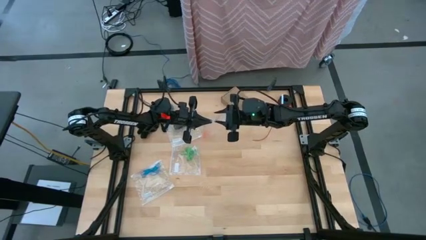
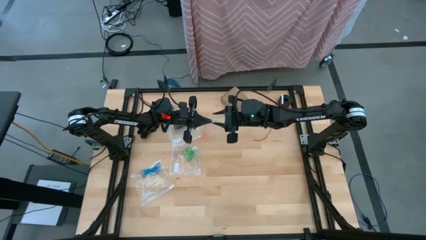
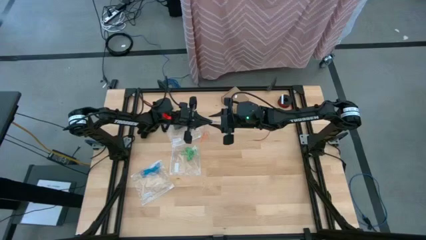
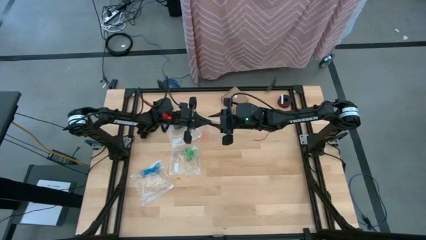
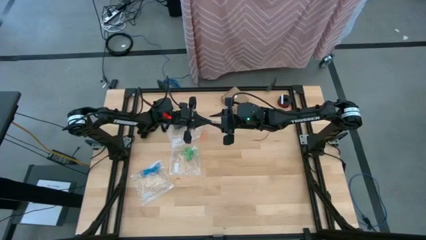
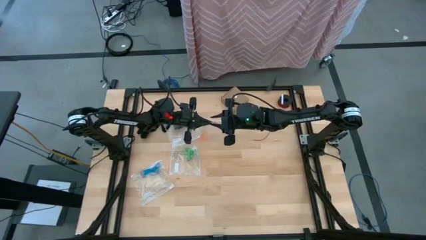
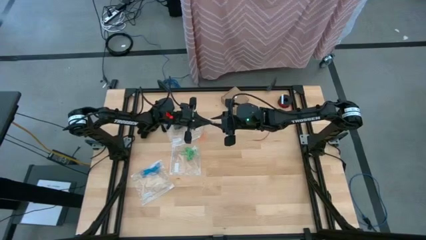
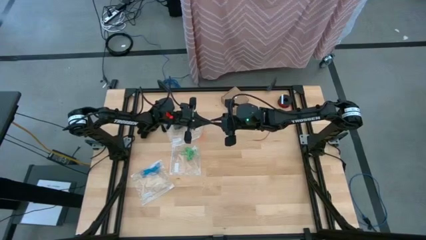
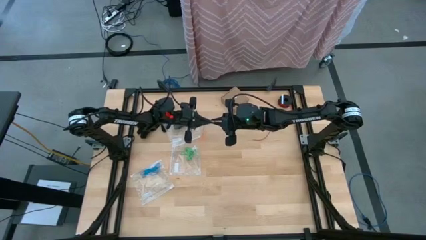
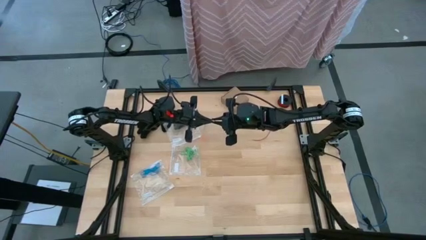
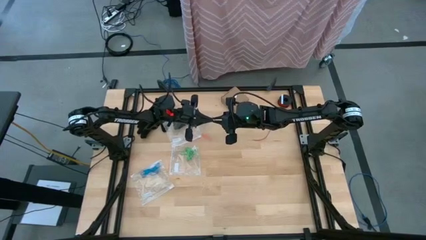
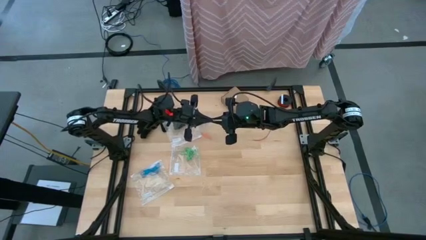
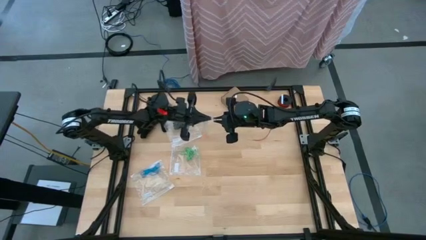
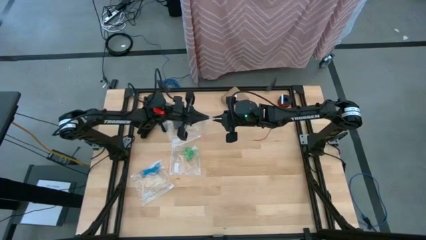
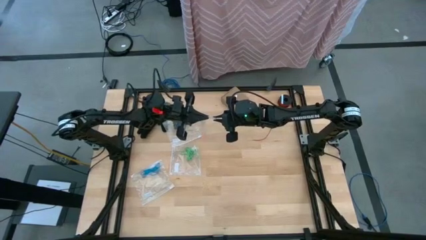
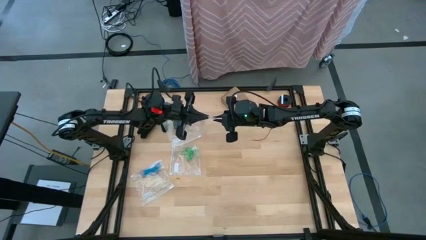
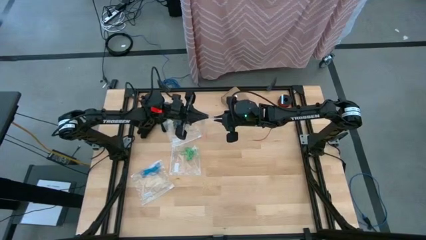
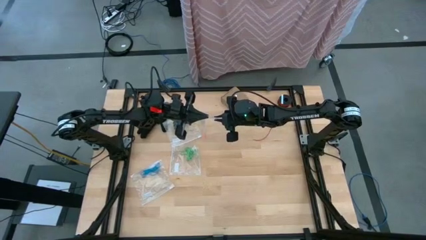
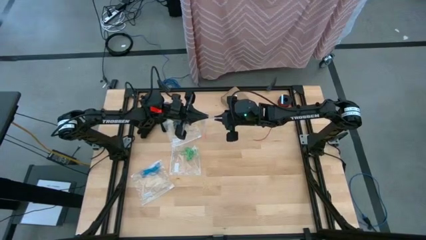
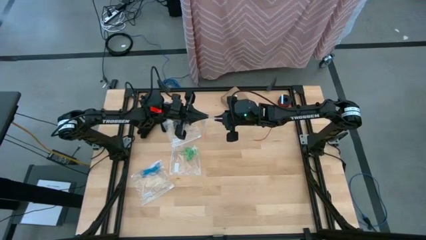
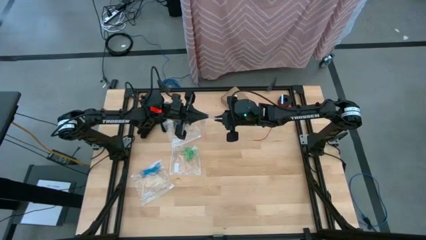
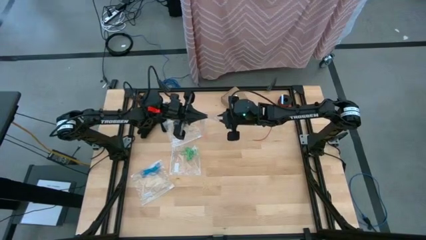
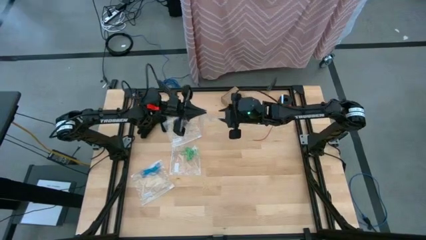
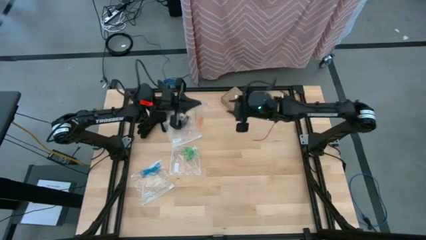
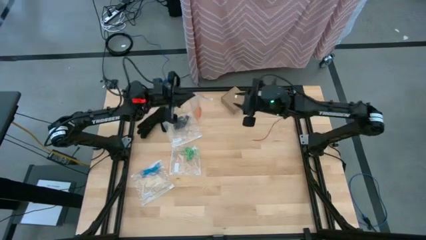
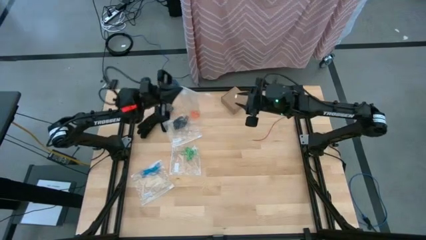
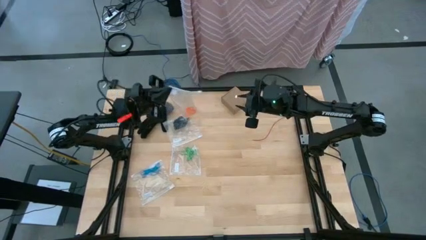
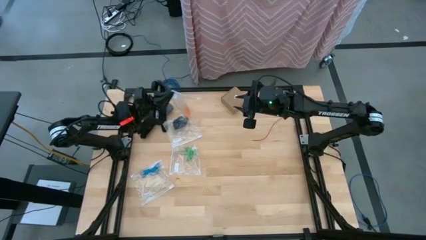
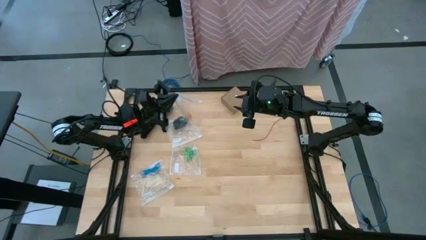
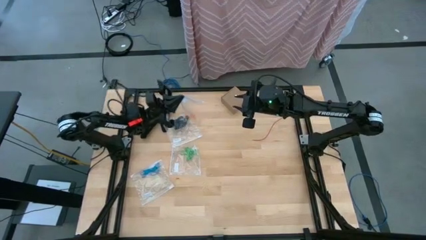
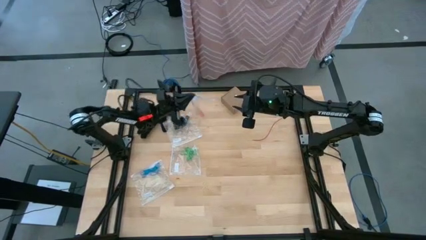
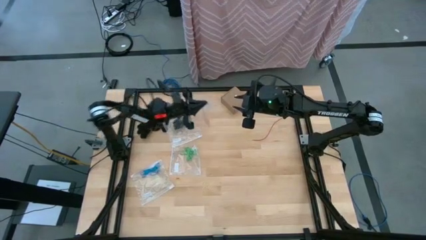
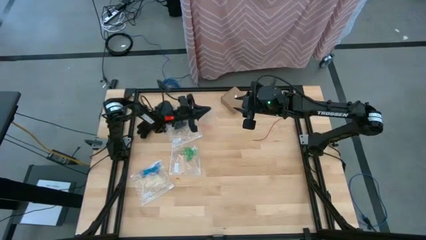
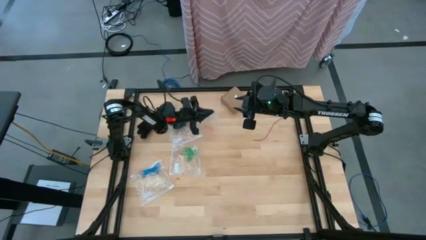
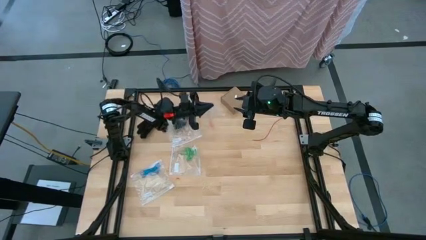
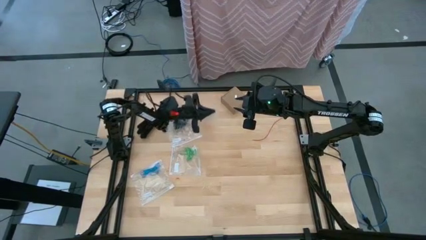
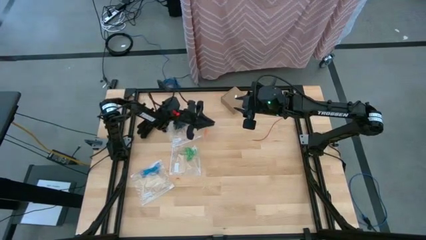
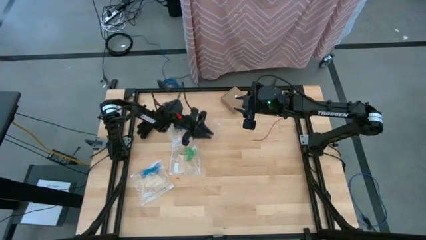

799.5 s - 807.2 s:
Task: Sort rubber bands
Close the transparent zip bag

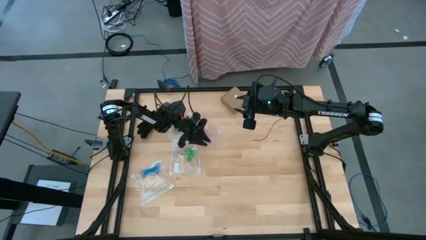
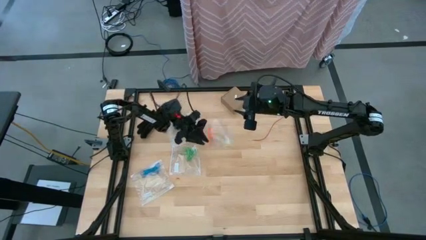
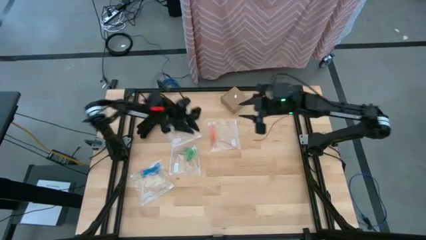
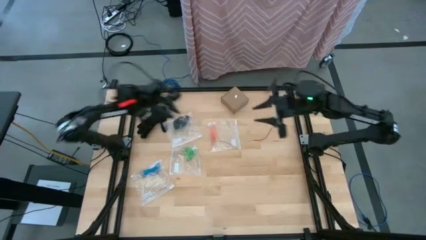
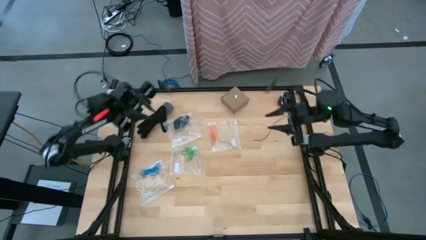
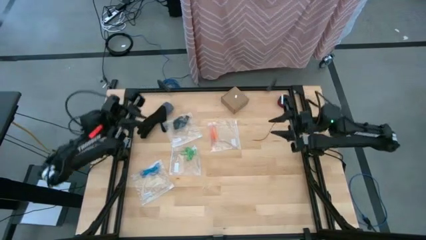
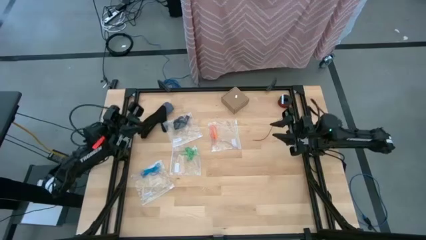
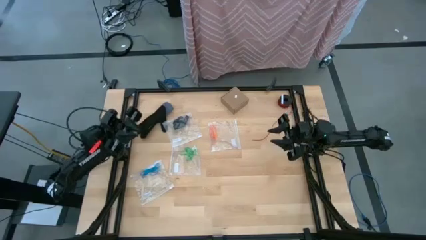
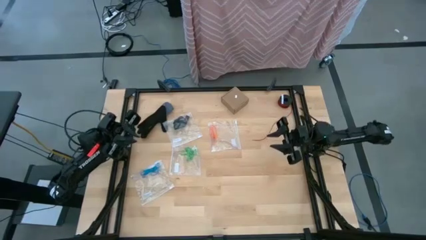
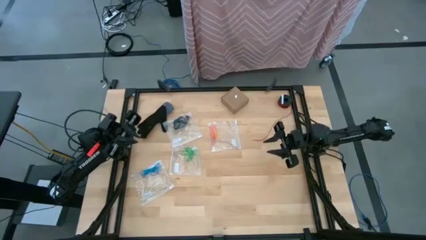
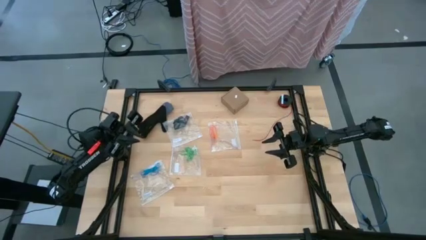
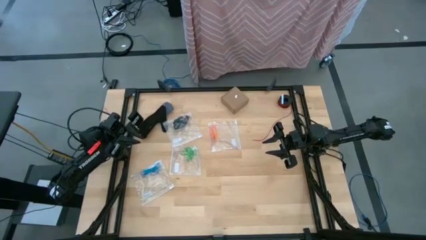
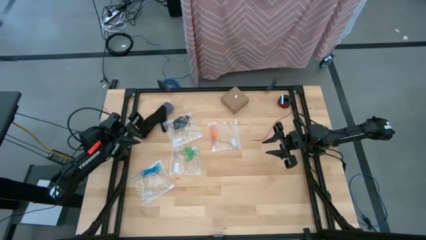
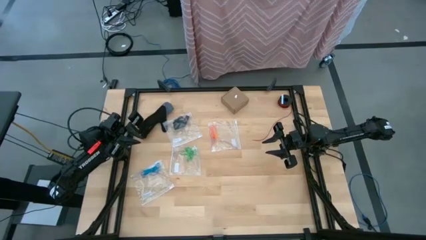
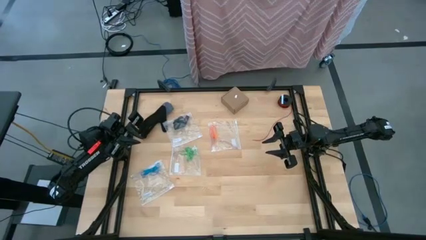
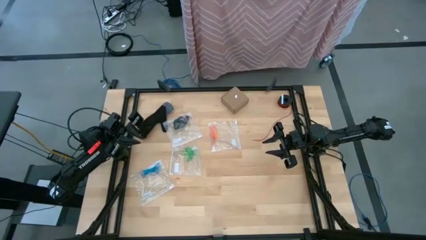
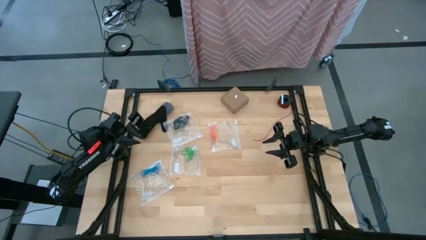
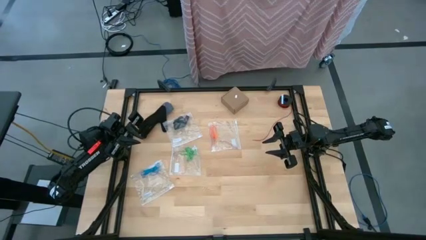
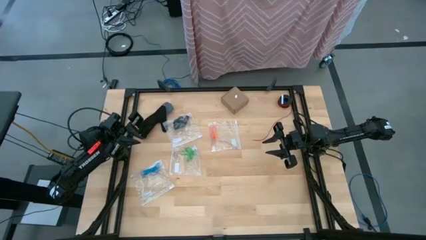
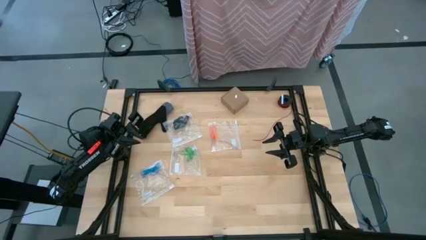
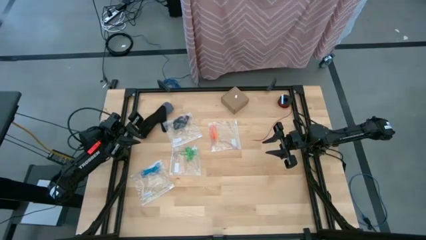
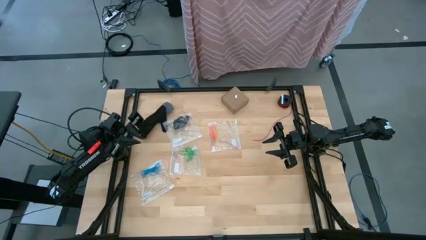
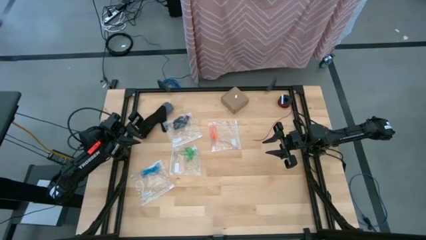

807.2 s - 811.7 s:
Return to Home Position

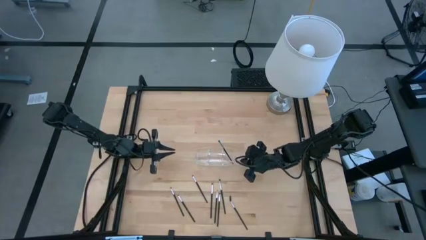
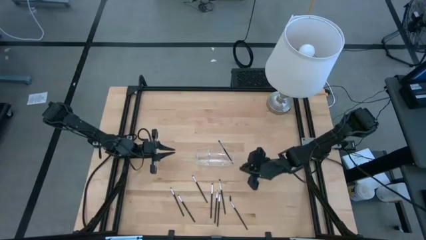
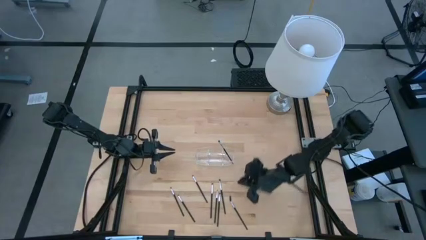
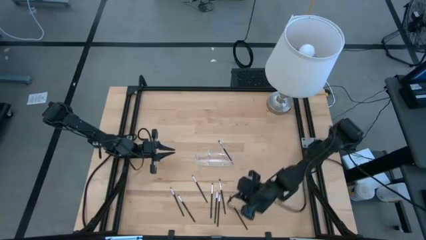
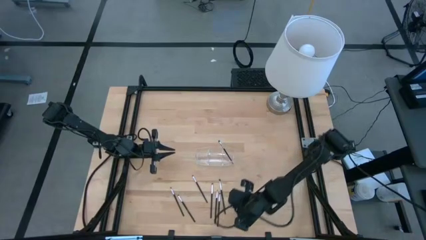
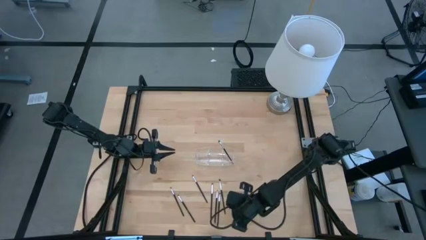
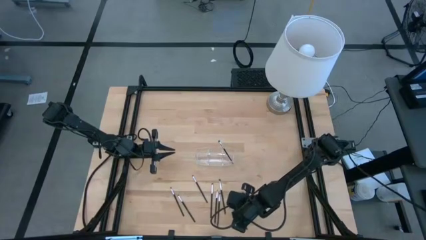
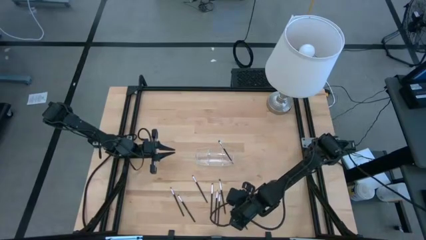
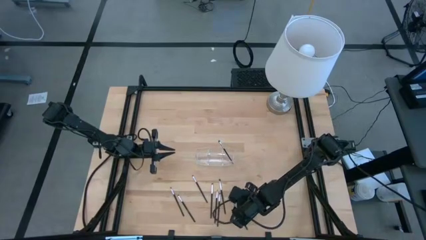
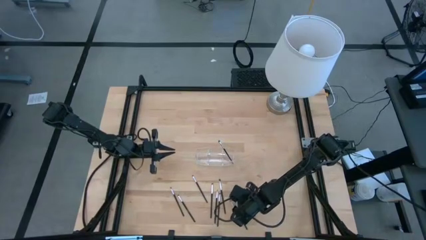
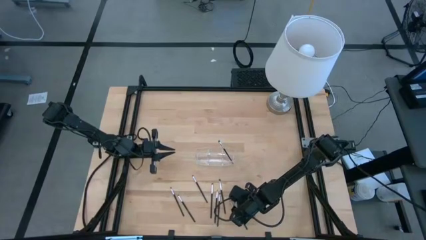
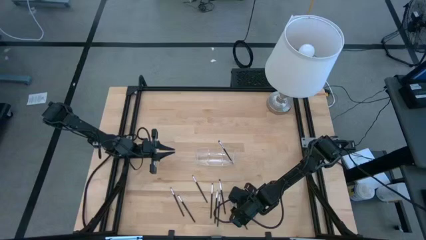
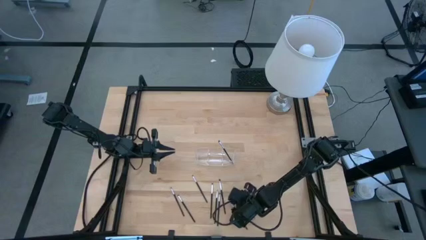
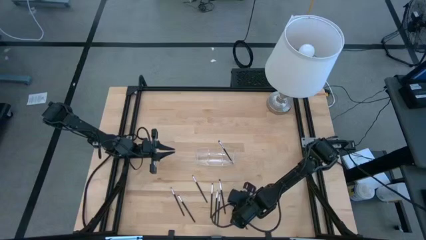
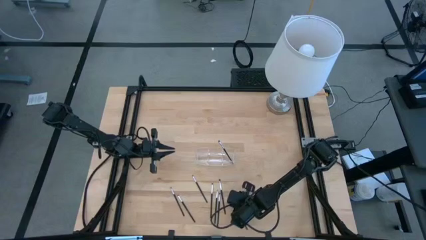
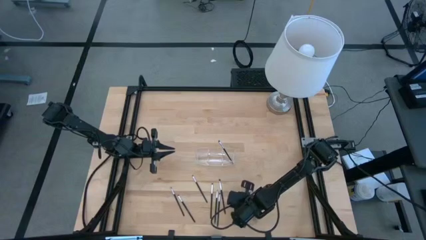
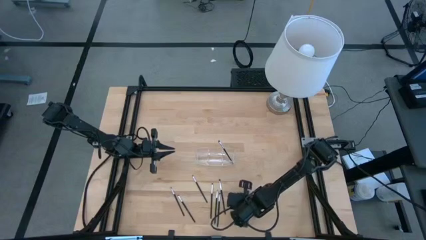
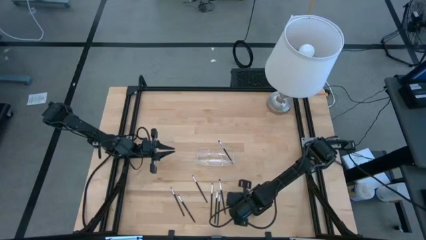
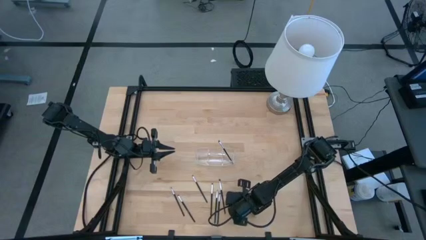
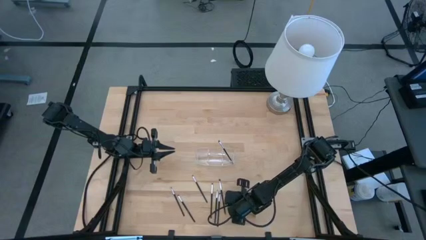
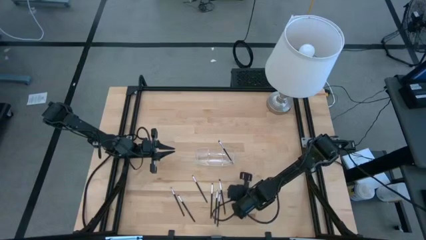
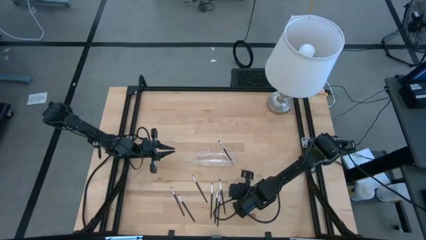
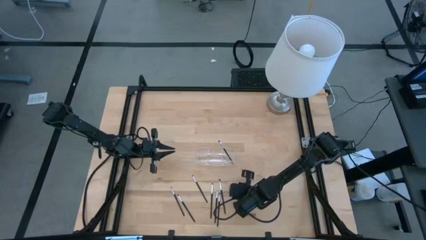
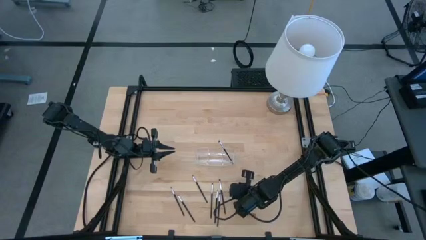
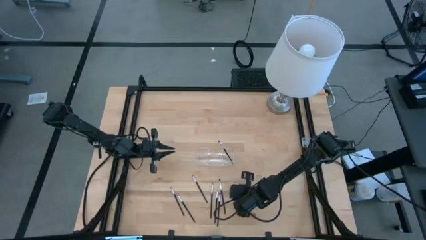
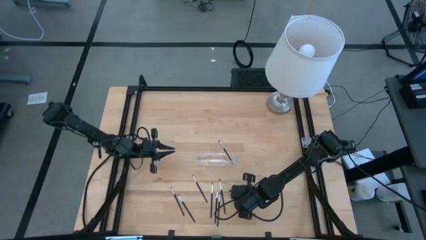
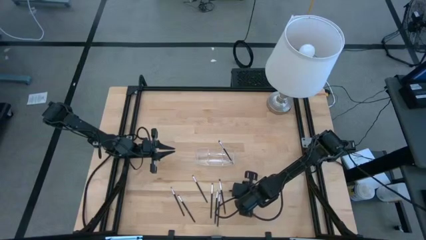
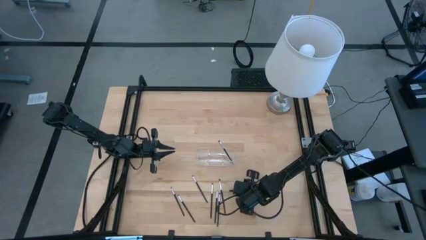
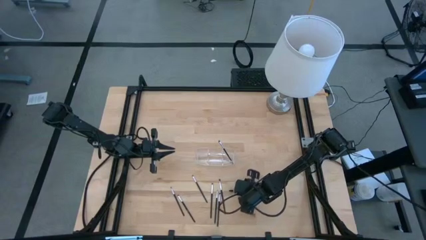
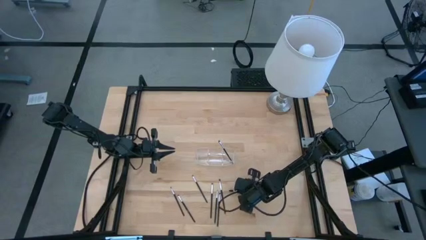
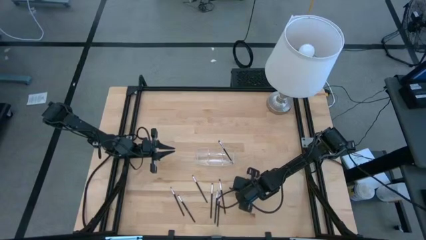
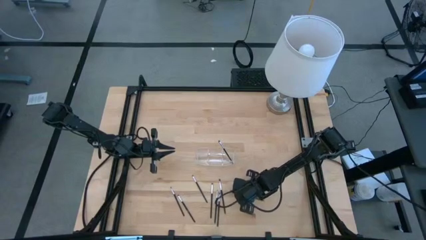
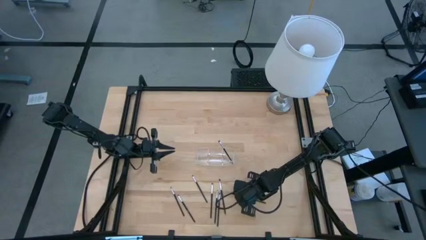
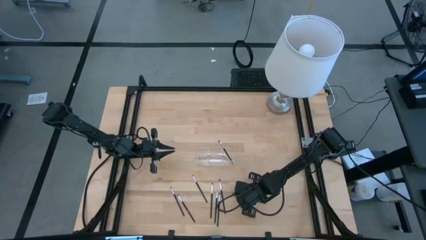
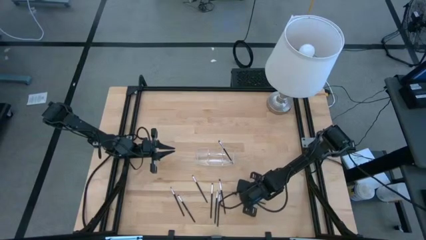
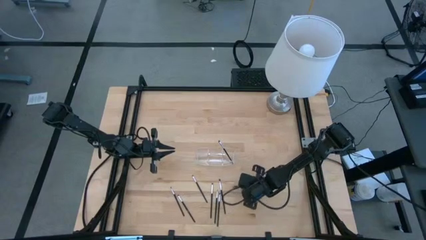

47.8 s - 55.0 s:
Task: Pick & Place Makeup Supplies
Put the makeup brush into the transparent organizer
